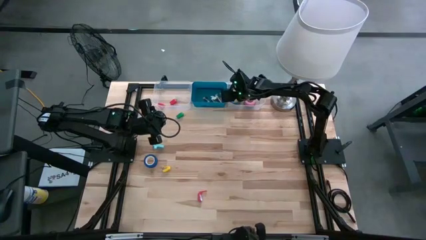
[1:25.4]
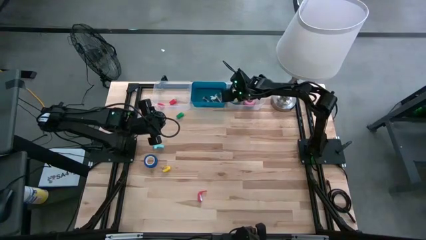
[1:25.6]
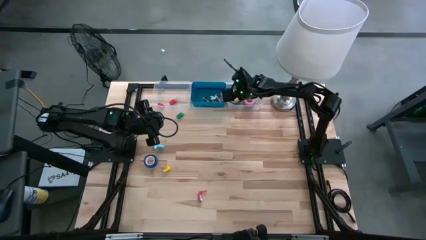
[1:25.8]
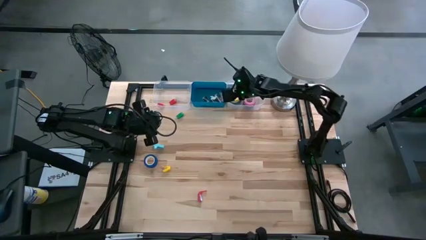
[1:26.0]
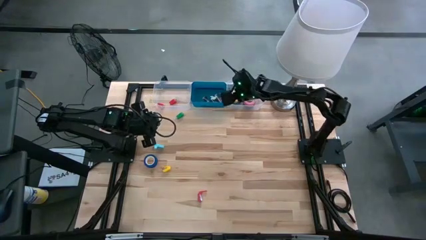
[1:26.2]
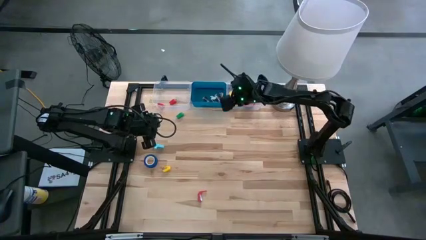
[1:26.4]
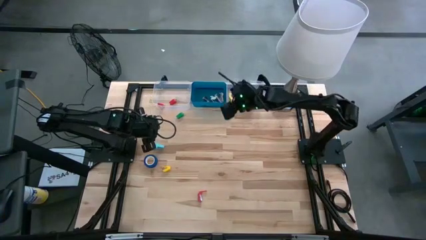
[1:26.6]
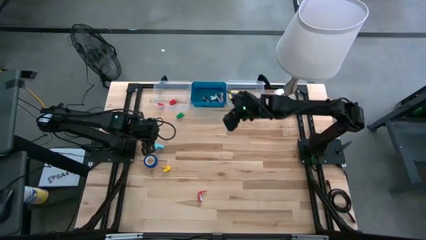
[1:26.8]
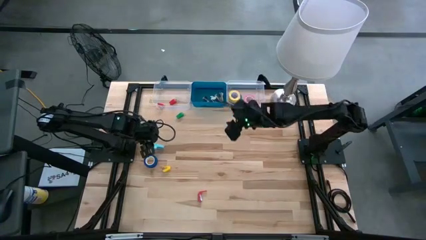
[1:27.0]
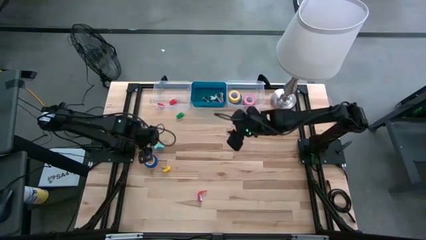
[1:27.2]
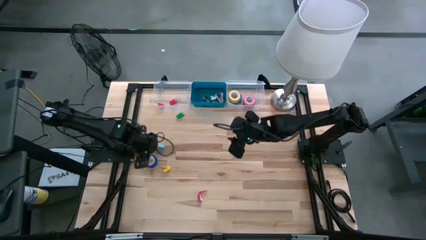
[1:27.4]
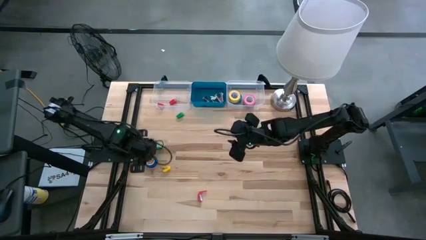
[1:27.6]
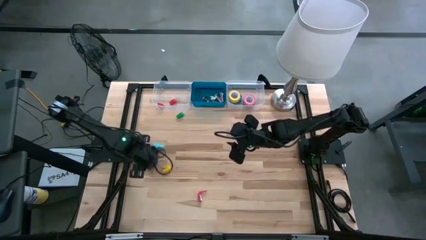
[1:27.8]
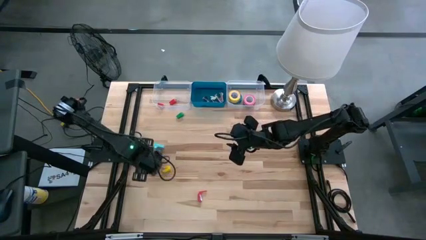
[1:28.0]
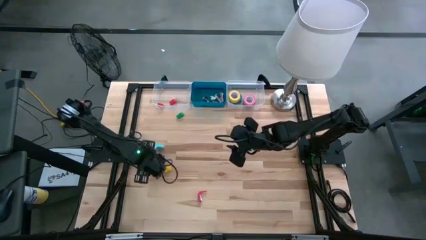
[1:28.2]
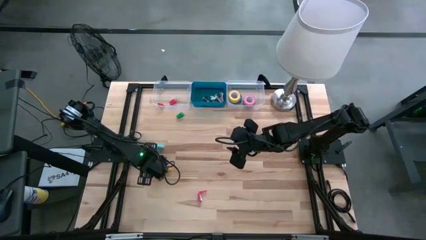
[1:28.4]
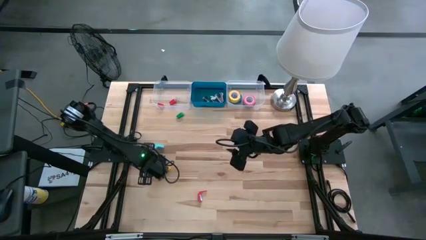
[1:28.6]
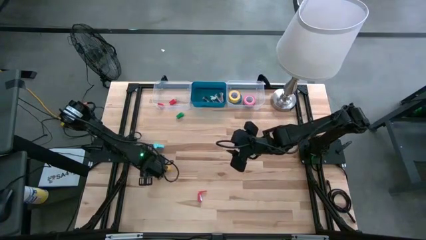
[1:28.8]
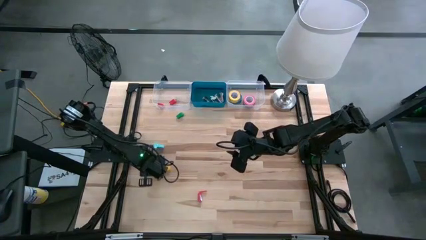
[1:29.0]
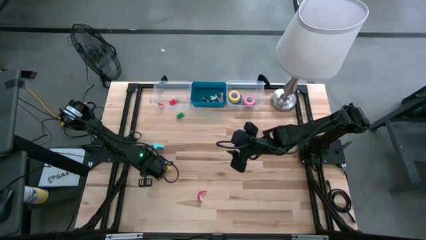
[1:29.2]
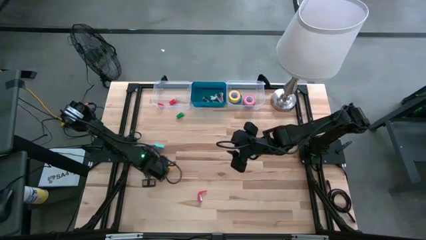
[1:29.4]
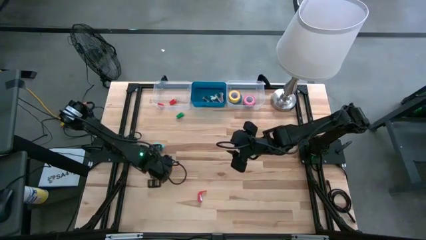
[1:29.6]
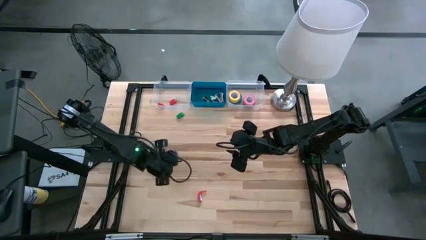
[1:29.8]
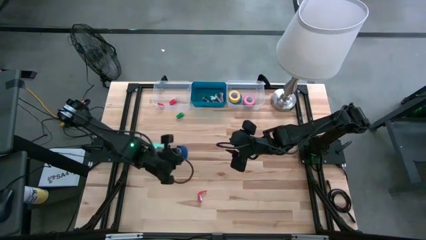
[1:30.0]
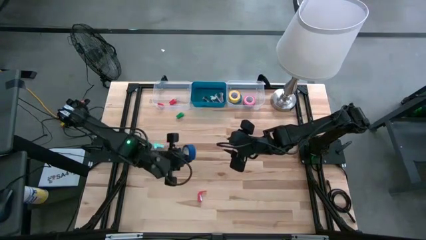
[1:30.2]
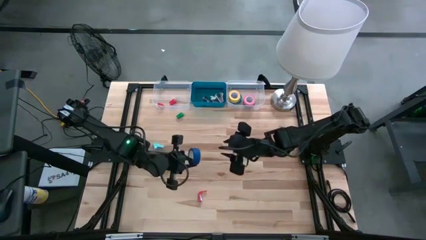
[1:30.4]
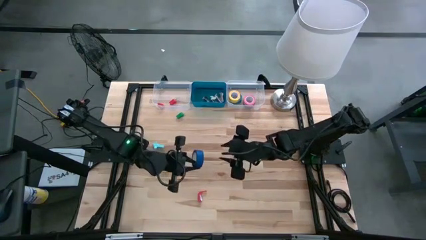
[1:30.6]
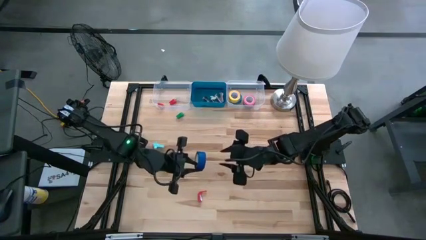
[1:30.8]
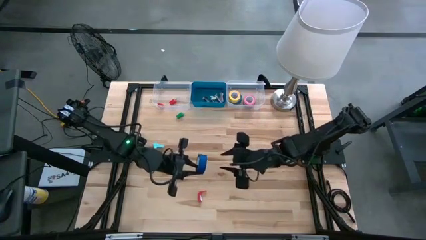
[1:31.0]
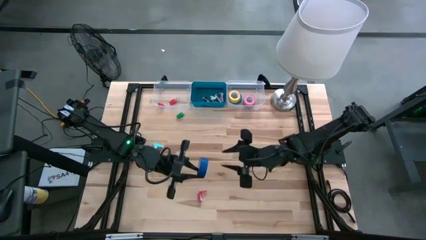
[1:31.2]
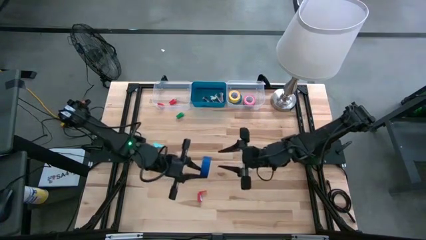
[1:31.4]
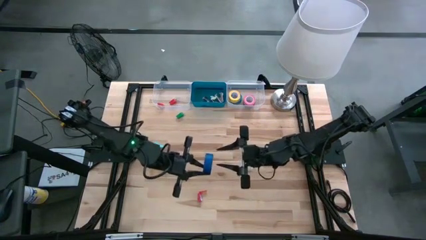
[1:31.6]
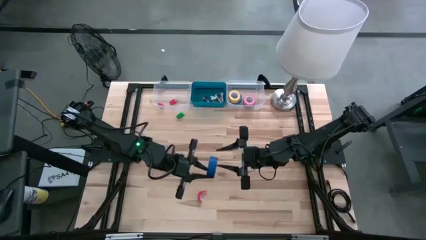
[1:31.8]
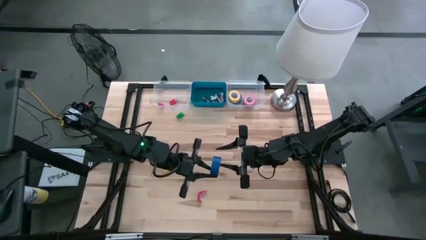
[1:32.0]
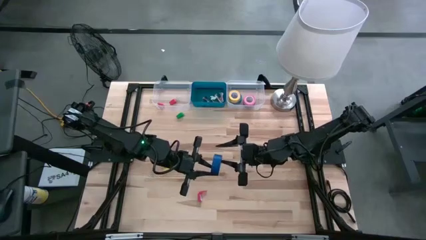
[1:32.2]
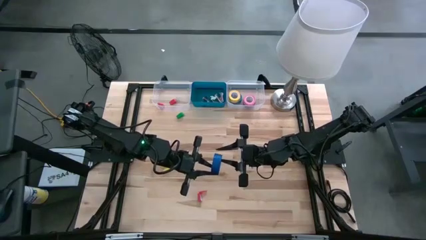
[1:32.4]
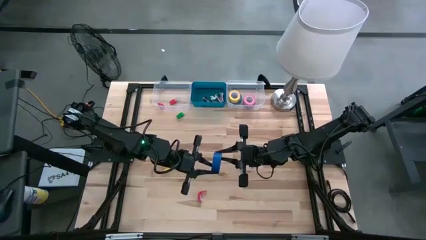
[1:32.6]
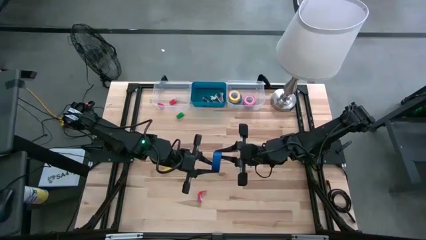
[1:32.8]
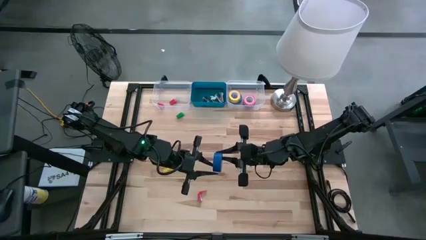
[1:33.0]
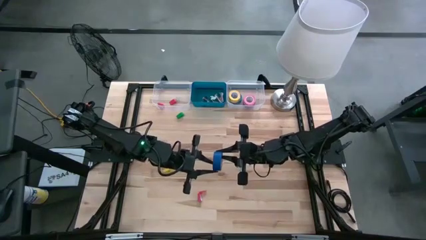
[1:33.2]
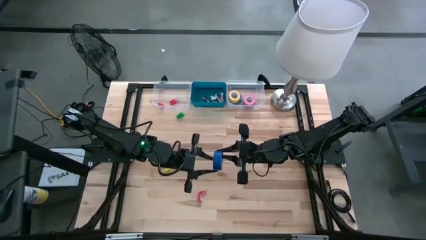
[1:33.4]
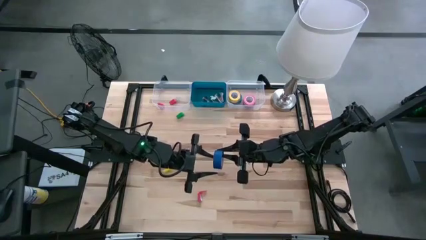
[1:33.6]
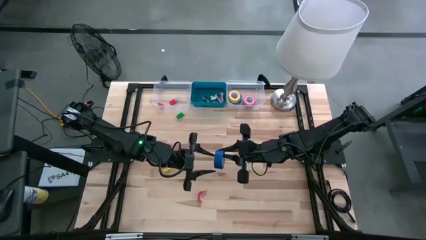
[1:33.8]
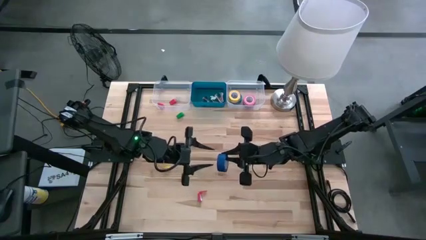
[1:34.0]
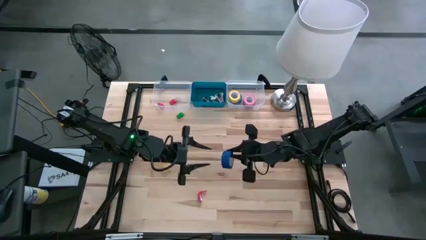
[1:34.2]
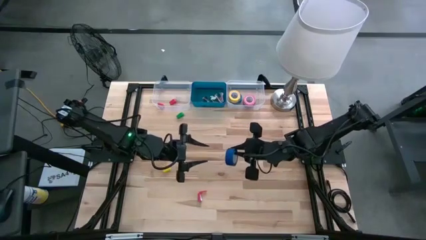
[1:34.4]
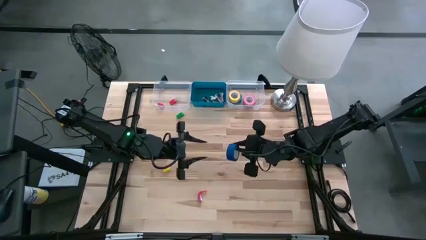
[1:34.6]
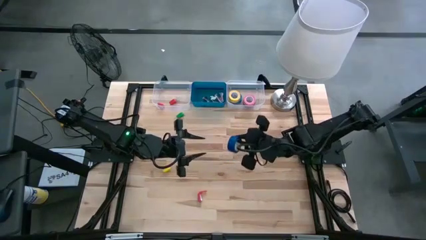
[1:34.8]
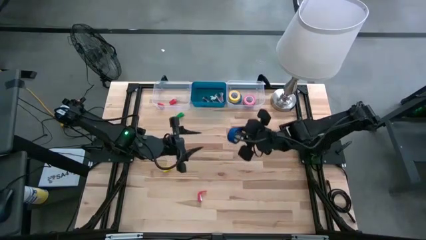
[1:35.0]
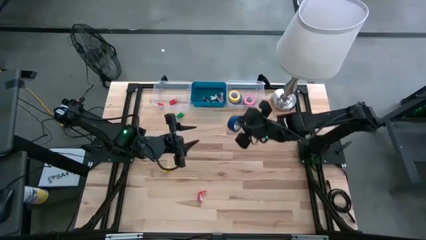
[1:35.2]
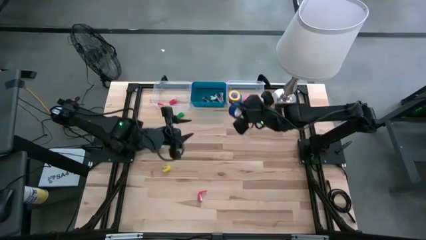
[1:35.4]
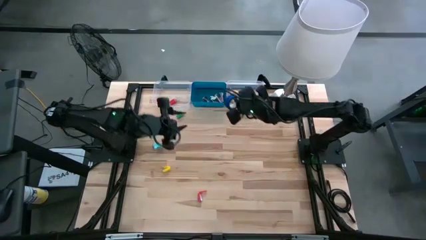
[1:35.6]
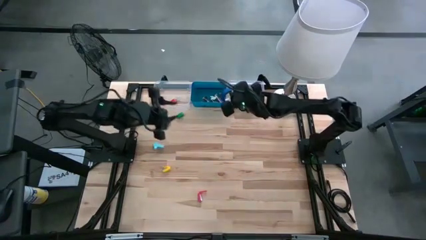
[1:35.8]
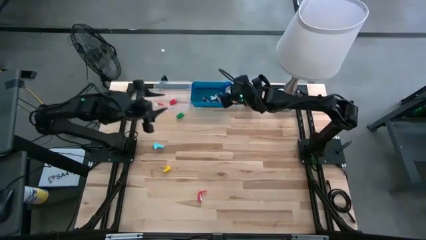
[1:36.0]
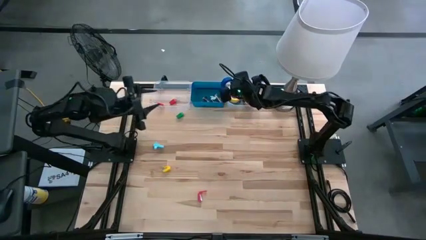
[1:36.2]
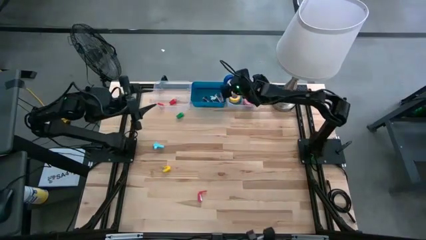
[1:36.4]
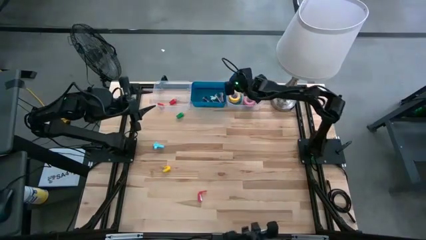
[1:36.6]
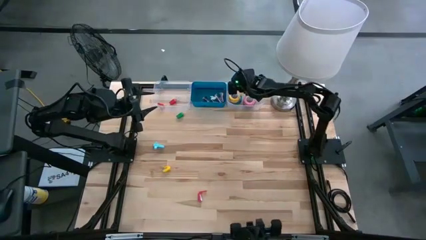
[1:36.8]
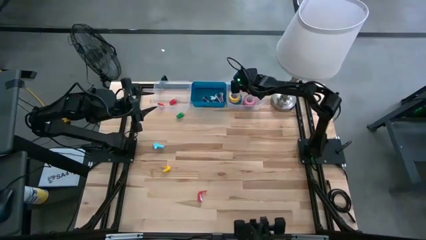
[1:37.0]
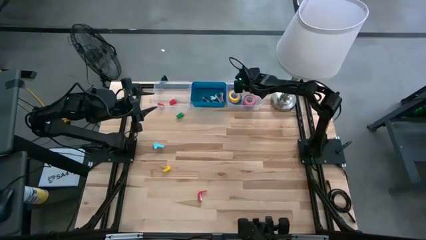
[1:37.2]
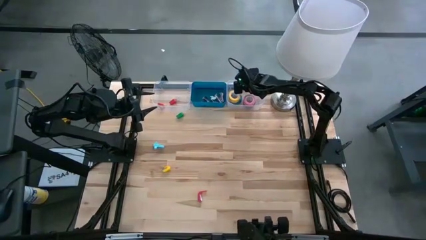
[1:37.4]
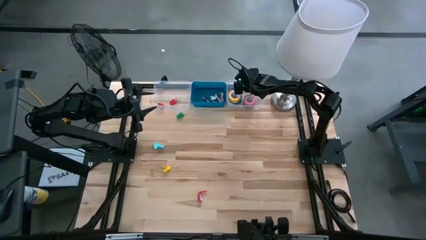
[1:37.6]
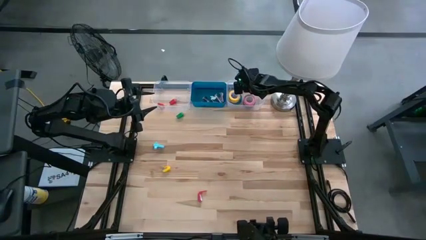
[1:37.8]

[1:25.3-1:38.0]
Task: Pick and place Stapler, Stapler remover, tape
Put the dark blue tape into the right transparent bin

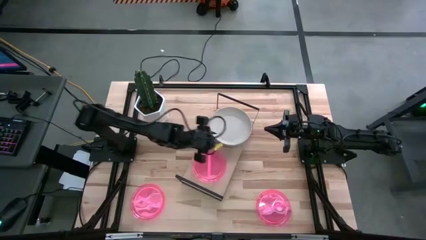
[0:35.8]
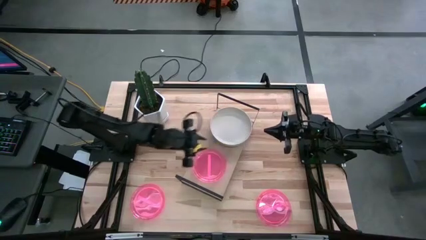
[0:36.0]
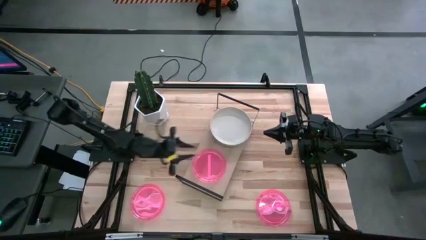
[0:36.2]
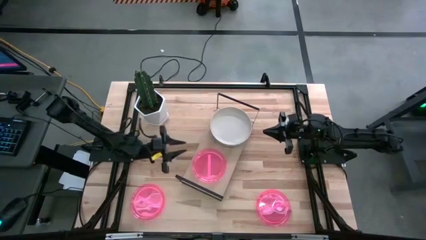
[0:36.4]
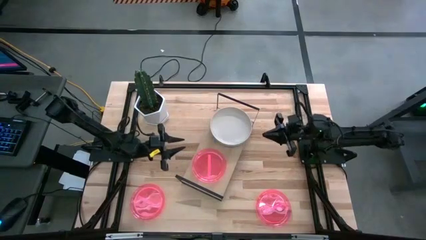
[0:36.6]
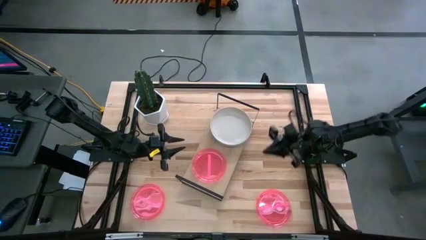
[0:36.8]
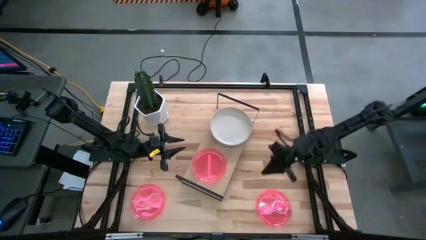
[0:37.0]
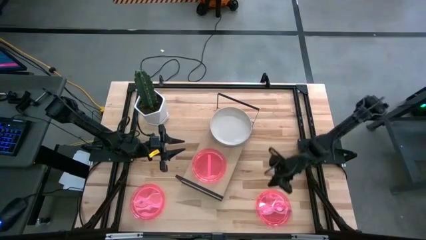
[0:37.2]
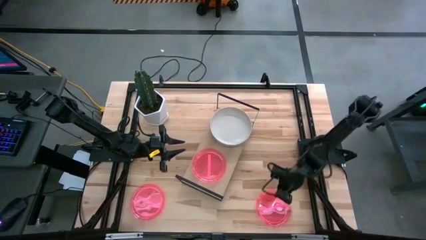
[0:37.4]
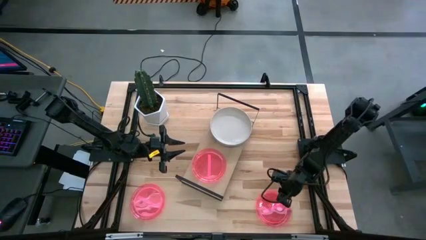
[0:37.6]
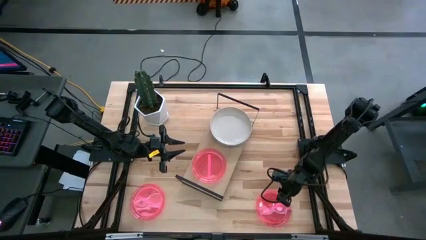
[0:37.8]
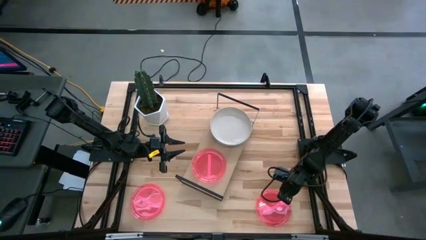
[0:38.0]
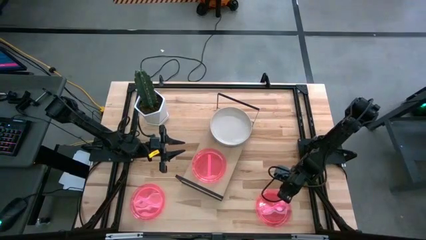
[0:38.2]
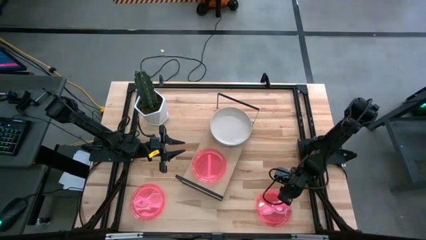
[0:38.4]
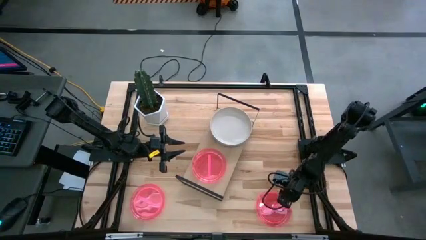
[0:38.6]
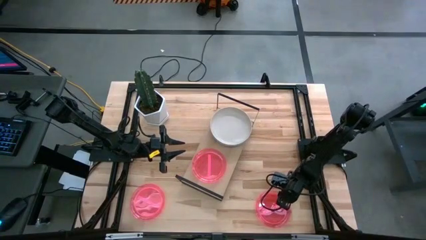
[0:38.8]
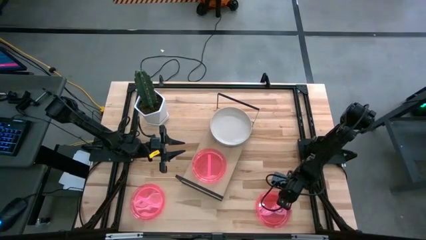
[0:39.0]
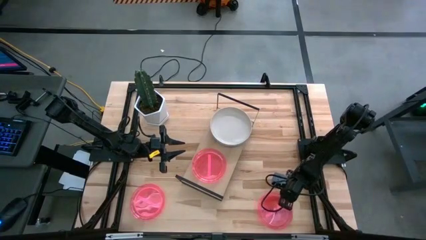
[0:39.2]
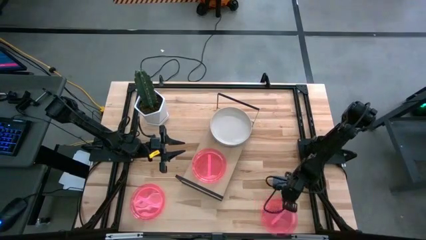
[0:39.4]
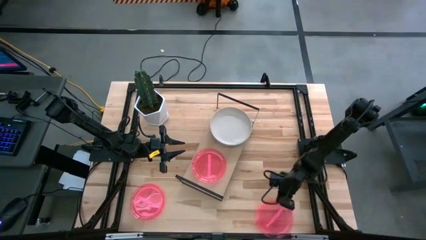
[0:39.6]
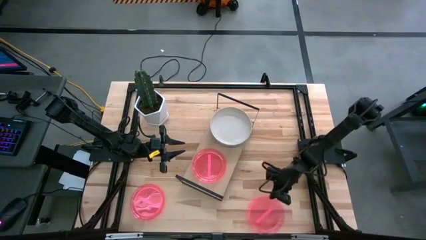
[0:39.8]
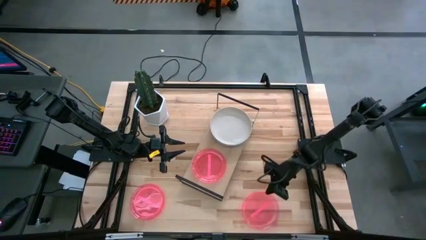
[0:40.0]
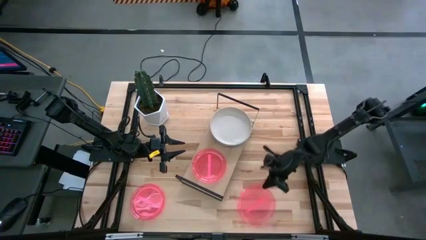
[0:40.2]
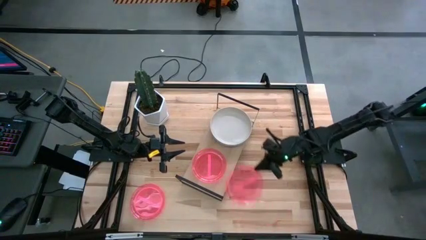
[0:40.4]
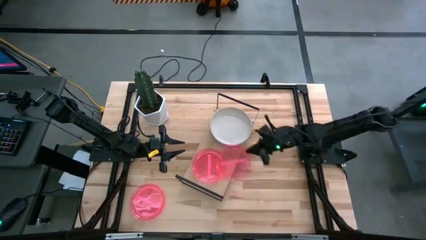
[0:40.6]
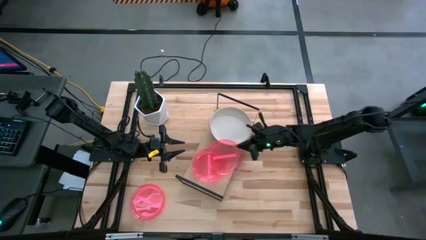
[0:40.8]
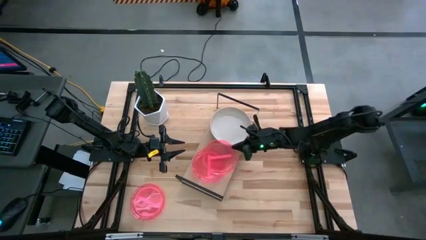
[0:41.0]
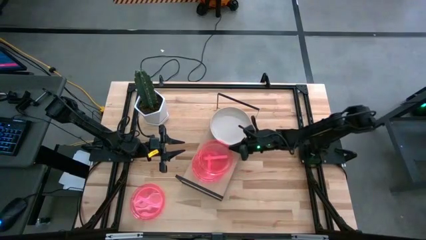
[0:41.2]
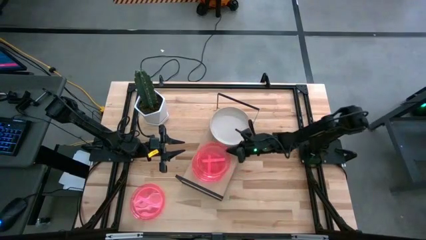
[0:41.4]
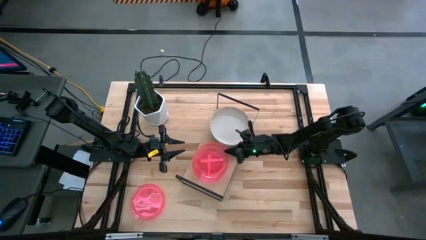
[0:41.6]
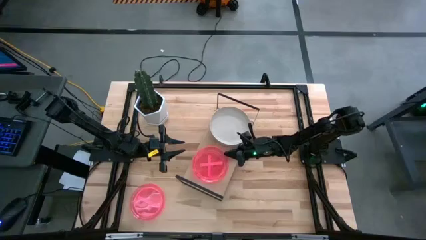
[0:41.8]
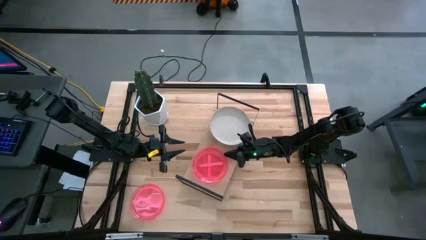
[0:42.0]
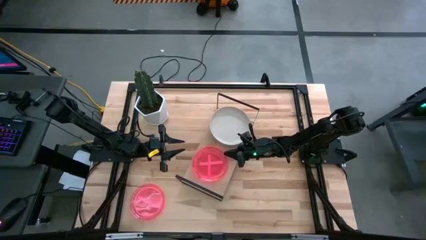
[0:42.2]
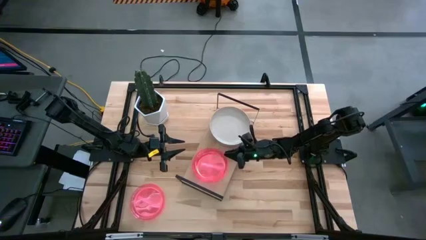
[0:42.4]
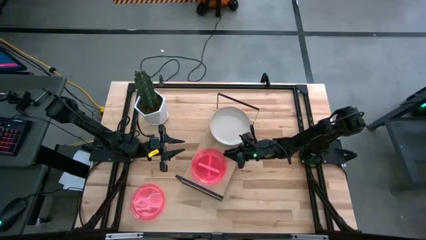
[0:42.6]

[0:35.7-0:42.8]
Task: Place and stack plates onto a shelf
Stack the right pink plate on top of the other pink plate on the shelf
